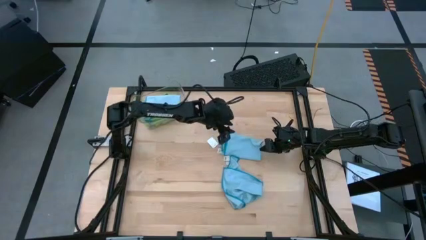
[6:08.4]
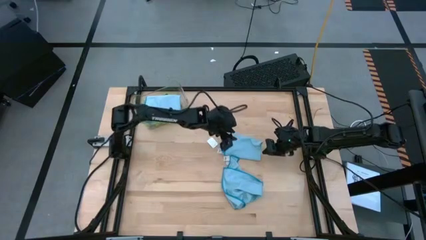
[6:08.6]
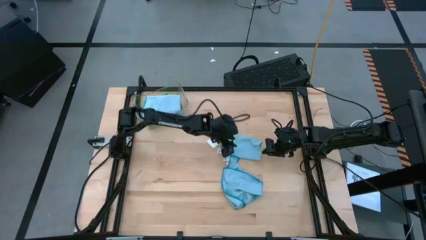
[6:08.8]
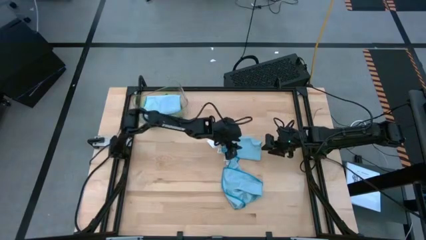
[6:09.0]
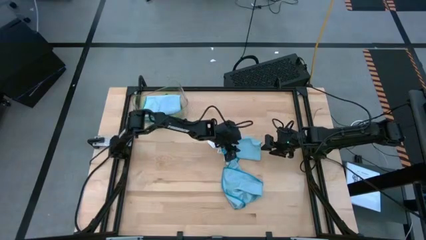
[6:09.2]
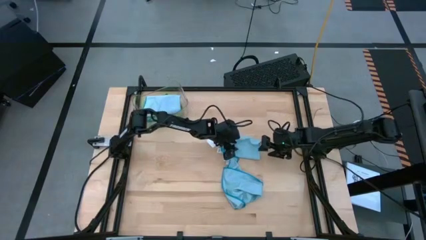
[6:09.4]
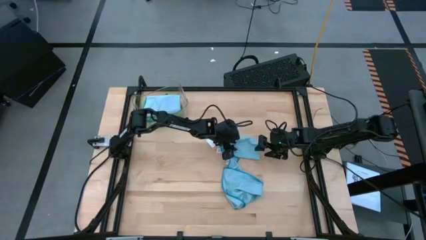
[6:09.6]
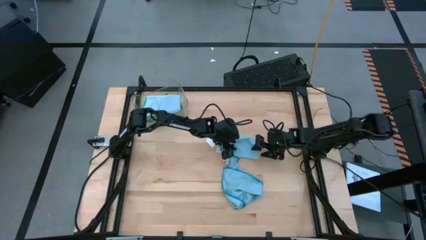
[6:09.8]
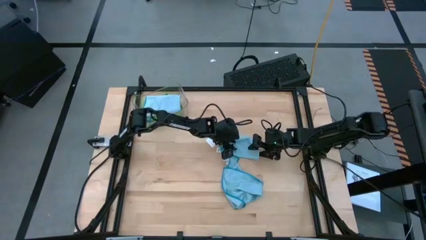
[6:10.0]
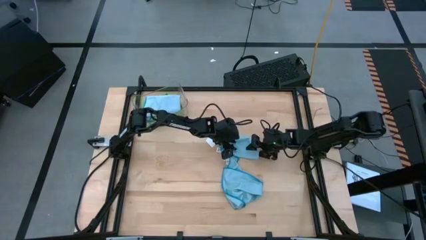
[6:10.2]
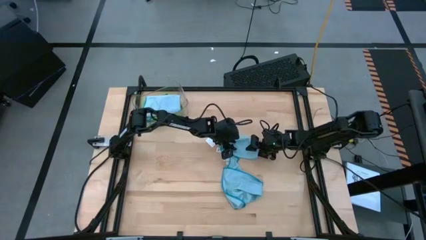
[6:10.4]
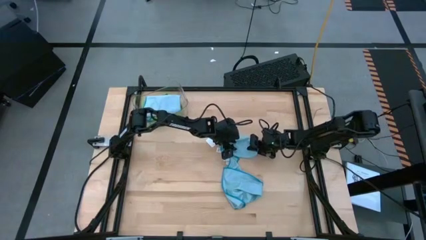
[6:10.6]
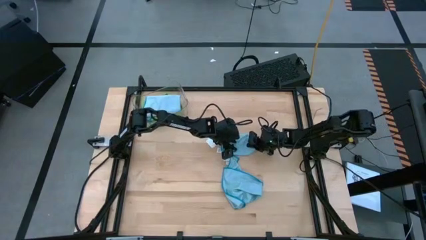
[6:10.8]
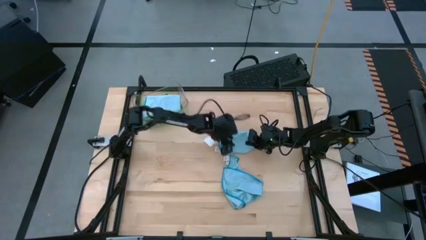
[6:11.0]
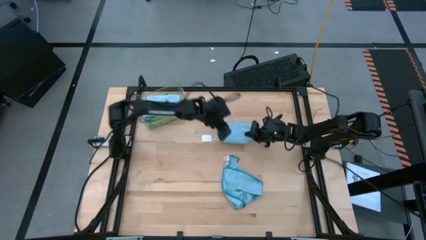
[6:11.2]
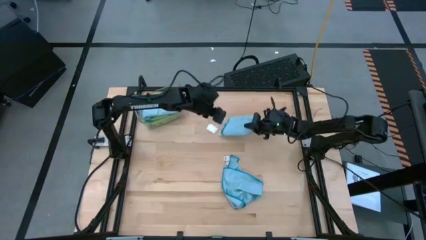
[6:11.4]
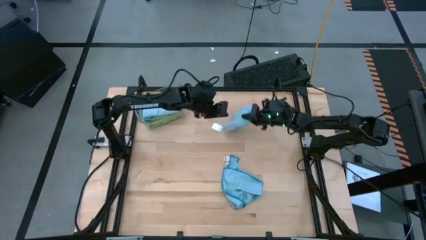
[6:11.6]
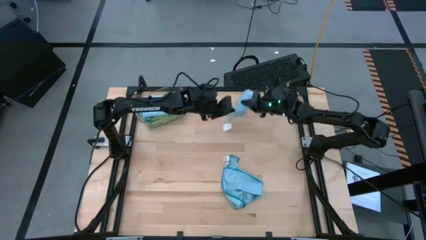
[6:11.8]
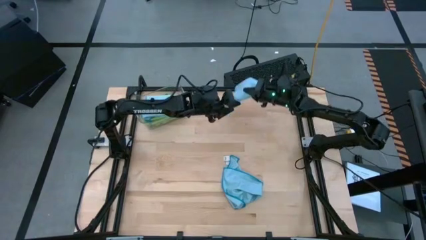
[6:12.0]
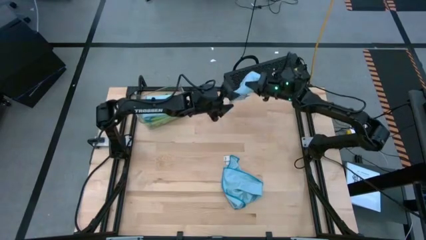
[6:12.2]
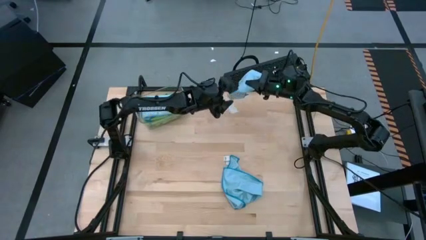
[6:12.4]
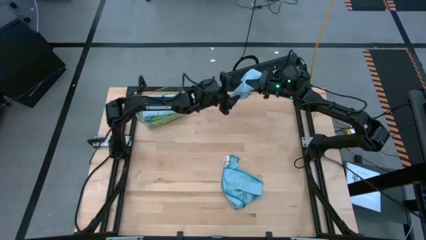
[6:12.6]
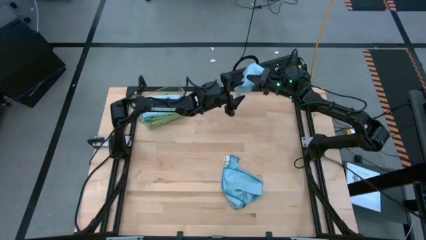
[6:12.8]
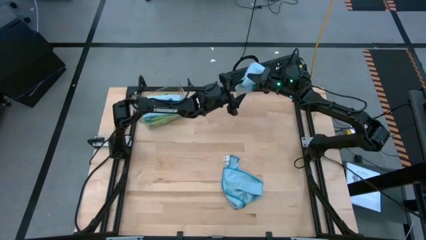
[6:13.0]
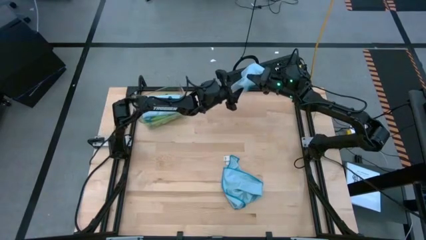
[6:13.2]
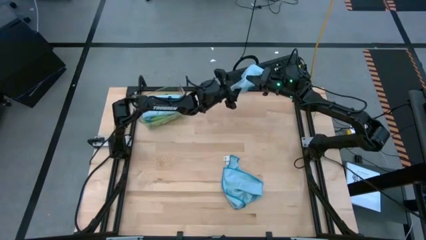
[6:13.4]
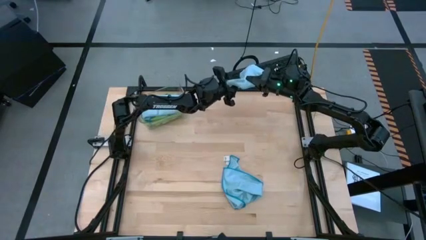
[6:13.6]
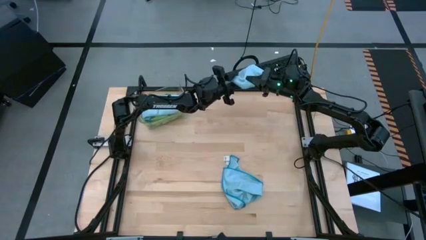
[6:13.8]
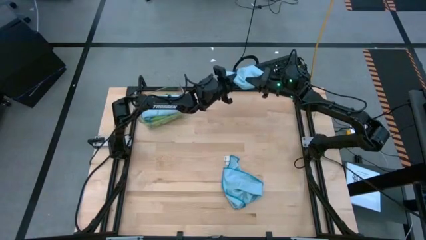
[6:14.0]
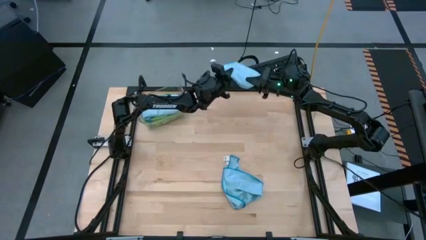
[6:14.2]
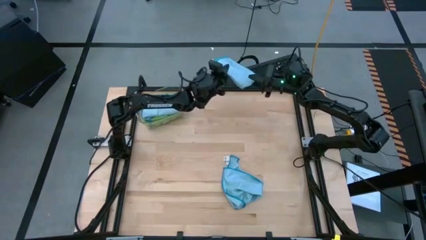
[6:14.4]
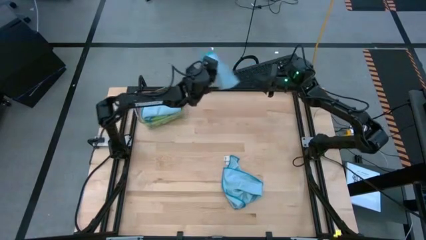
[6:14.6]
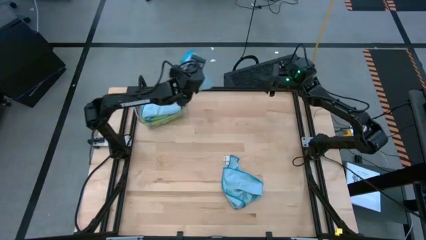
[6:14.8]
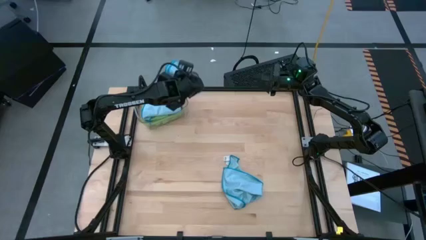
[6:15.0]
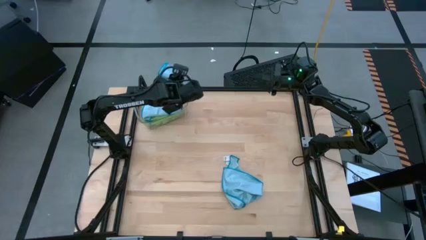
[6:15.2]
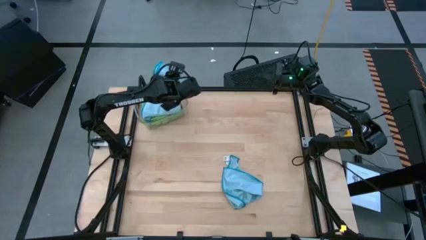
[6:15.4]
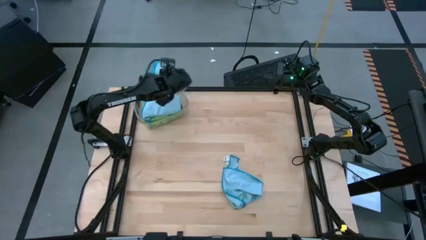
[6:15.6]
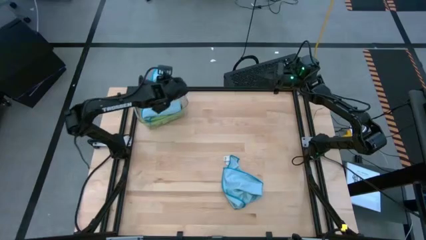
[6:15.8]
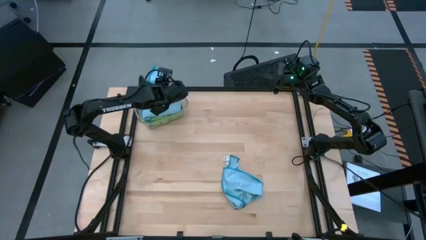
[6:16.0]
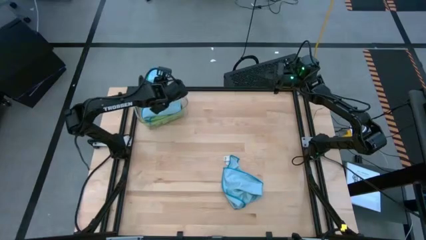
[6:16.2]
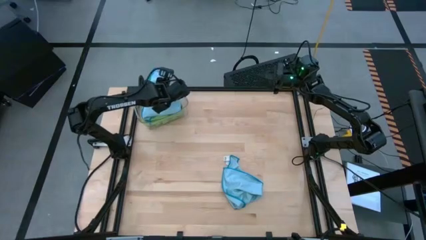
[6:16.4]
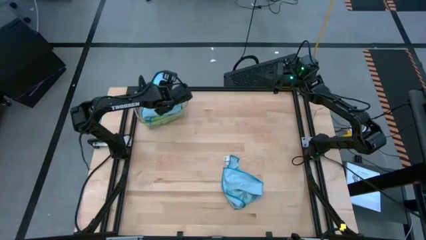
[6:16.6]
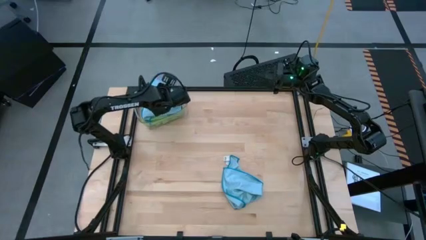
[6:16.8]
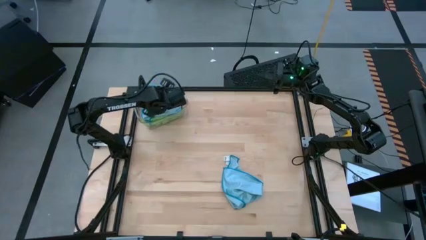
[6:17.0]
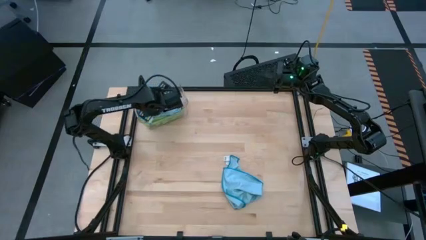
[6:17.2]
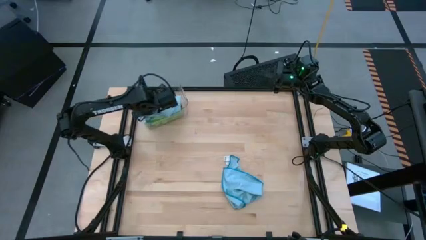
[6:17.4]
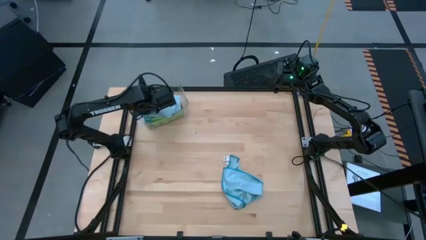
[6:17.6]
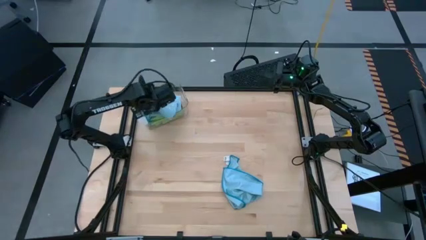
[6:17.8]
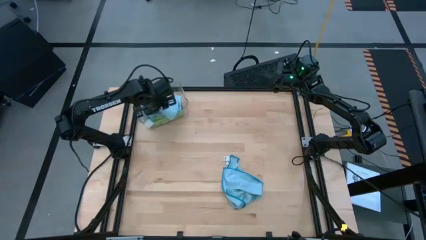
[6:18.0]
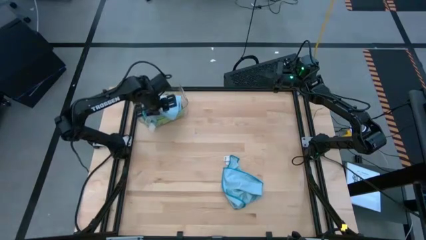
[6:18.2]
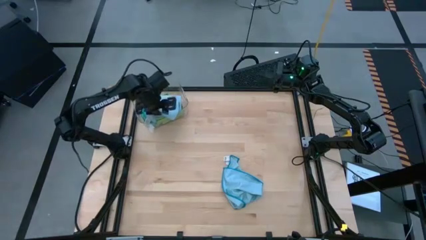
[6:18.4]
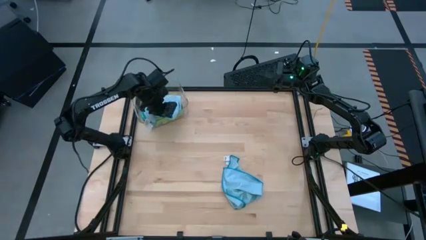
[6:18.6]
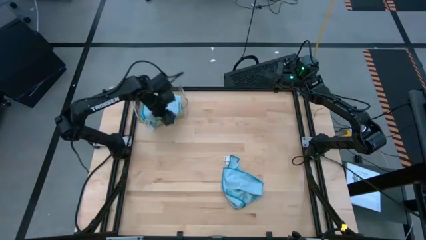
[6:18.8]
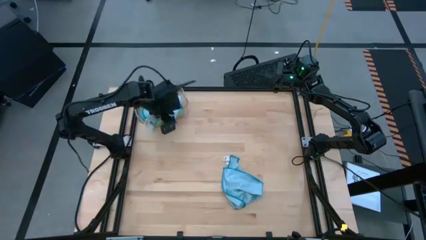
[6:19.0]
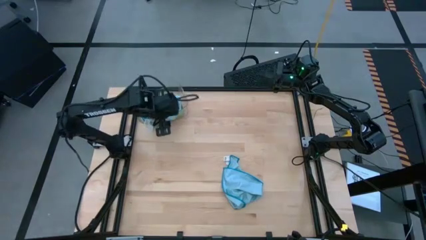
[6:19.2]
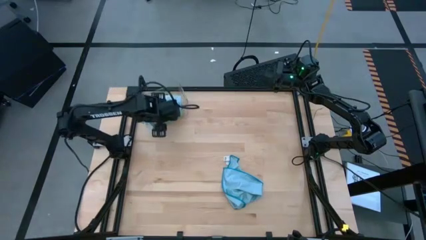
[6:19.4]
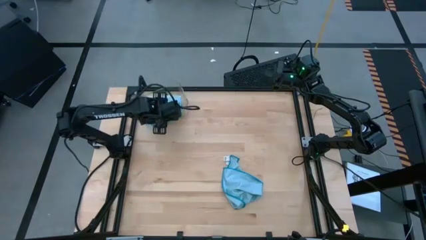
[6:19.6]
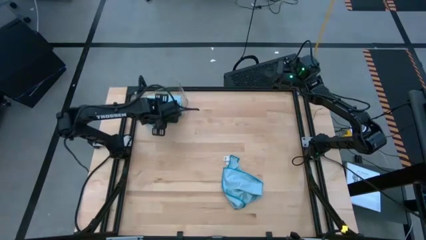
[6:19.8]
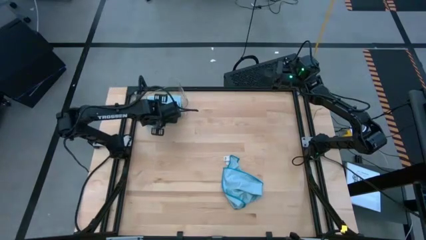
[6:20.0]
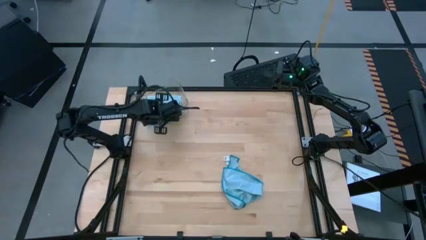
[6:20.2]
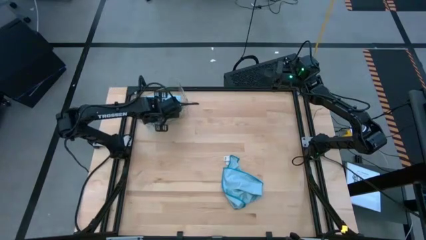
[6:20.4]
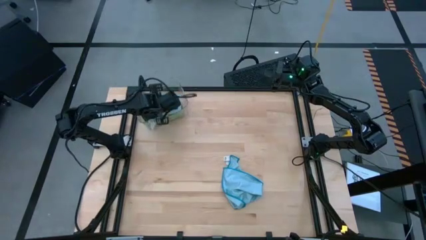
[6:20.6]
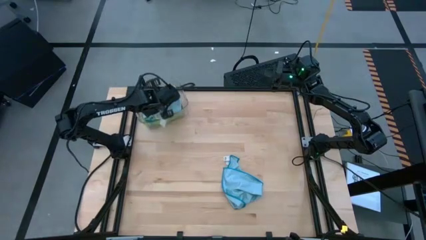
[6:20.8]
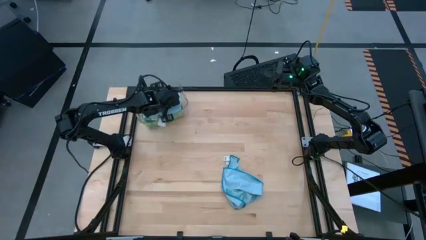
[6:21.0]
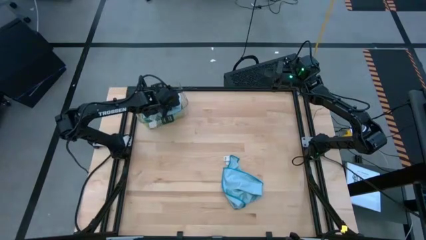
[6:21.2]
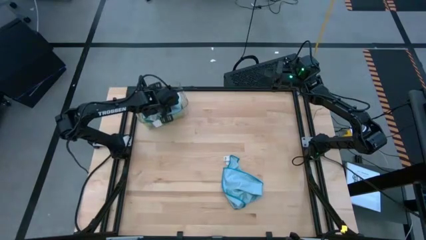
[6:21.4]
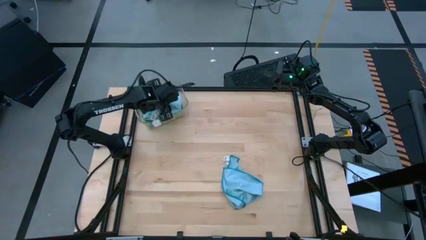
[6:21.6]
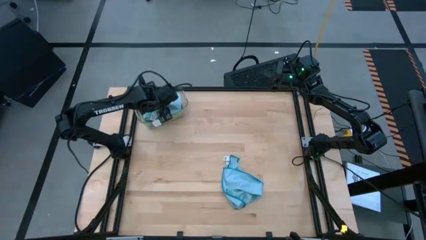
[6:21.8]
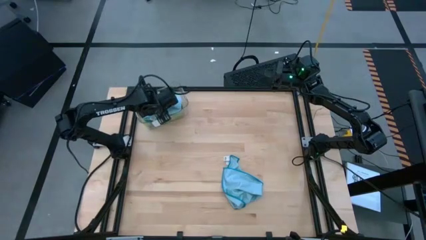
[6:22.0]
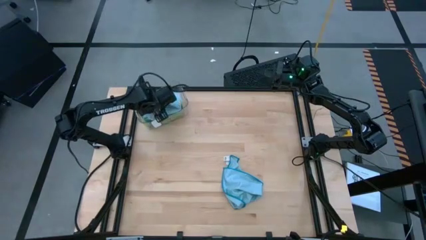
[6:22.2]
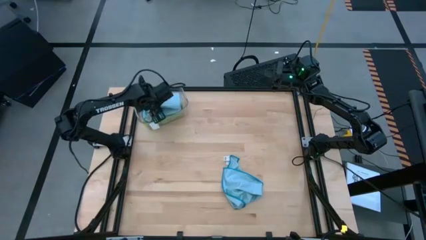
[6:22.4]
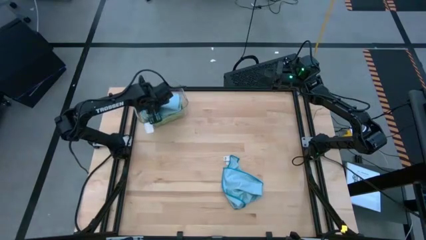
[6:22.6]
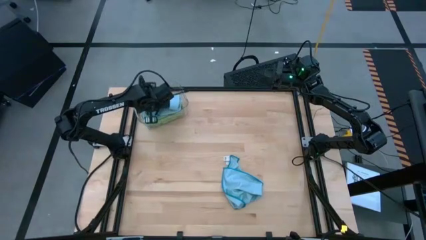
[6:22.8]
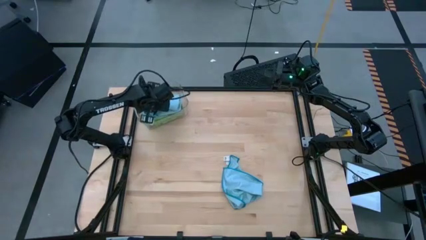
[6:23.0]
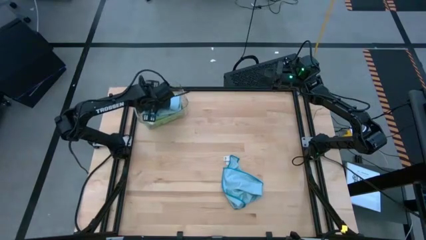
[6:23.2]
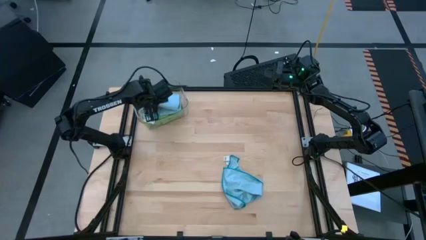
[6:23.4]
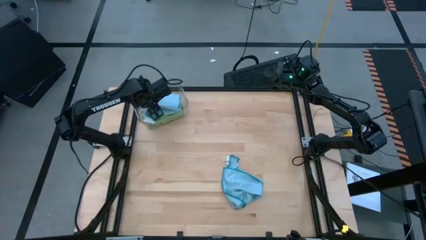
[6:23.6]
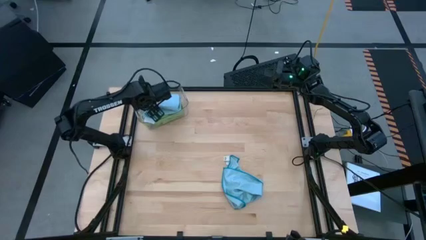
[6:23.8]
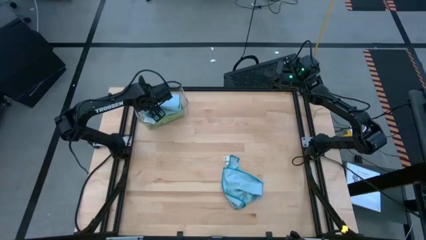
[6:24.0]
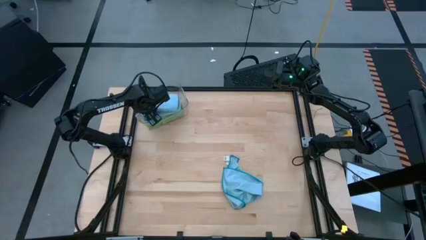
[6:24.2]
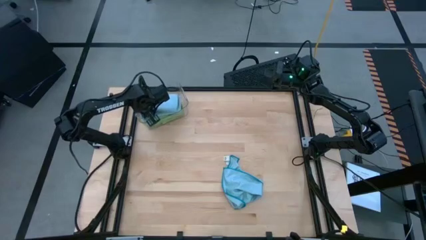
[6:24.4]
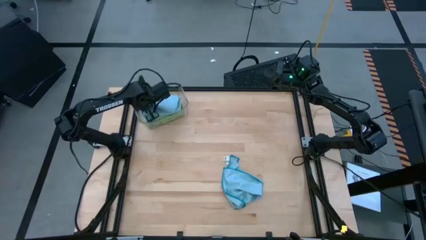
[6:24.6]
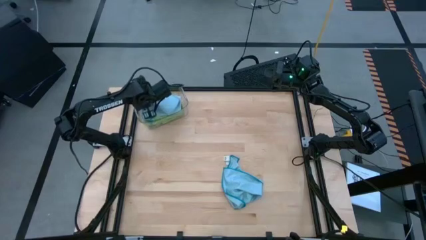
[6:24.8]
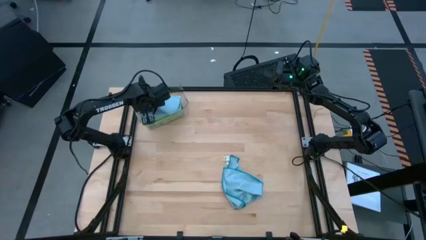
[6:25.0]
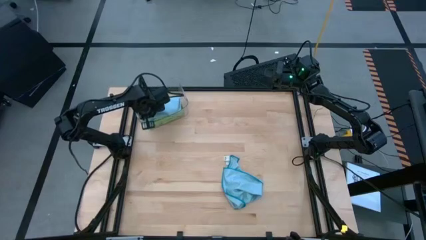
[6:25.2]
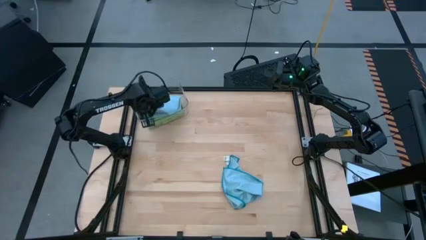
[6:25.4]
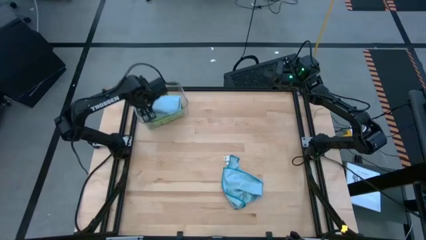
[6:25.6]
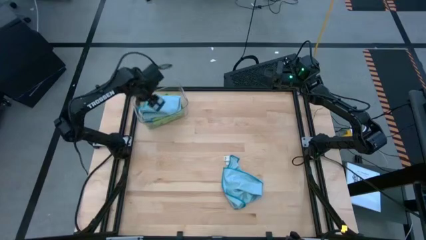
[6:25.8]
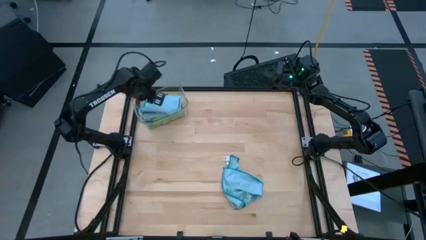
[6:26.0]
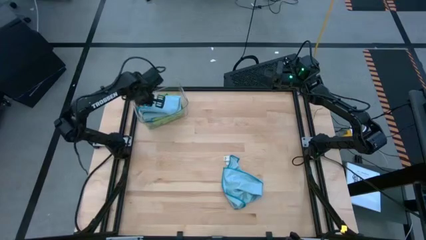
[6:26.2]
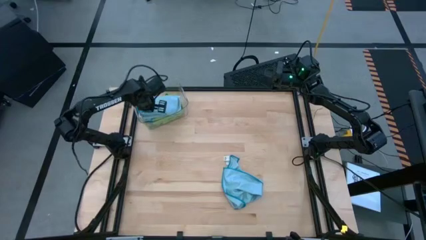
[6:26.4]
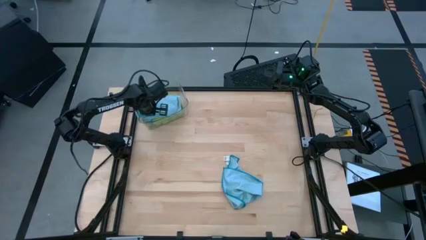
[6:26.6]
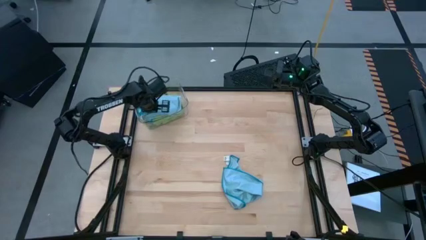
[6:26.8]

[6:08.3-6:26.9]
Task: Fold microfiber towels
Stack the folded blue microfiber cloth on top of the blue microfiber cloth on the transparent bin
